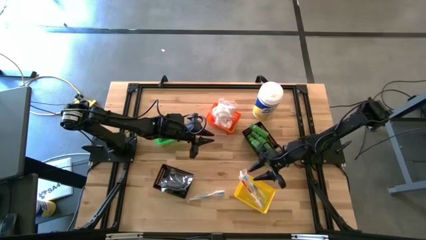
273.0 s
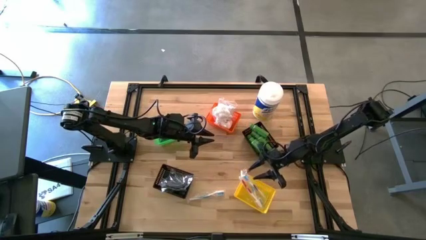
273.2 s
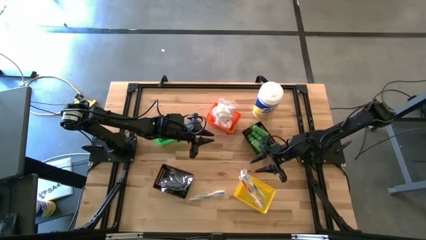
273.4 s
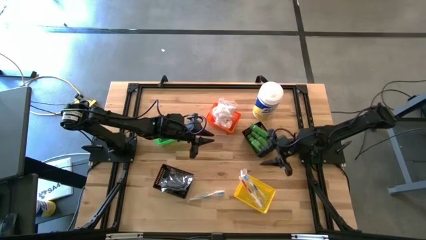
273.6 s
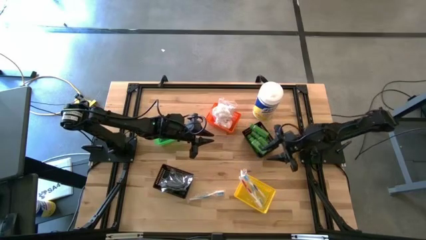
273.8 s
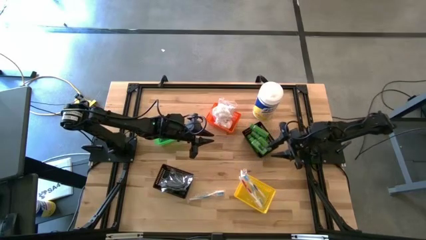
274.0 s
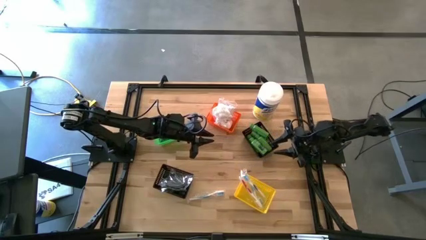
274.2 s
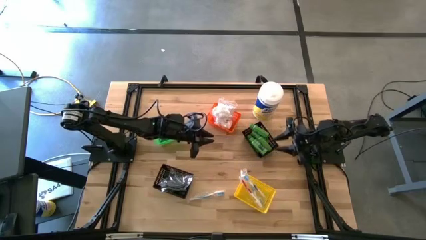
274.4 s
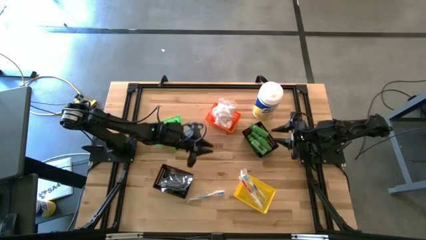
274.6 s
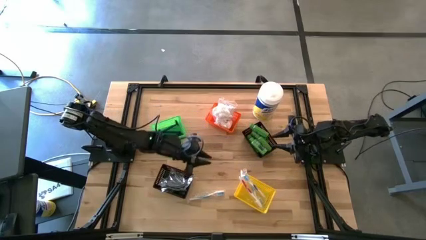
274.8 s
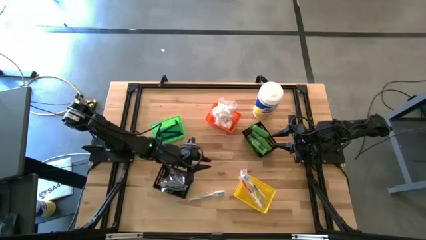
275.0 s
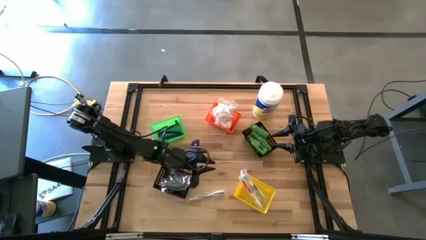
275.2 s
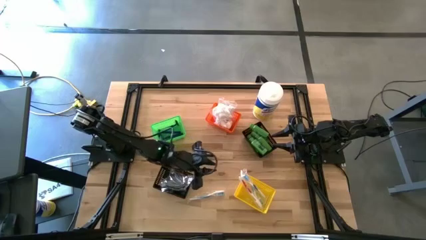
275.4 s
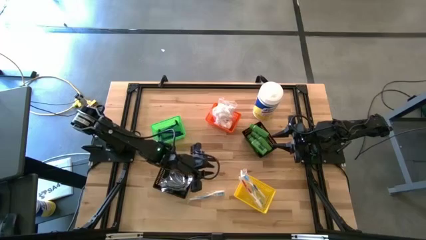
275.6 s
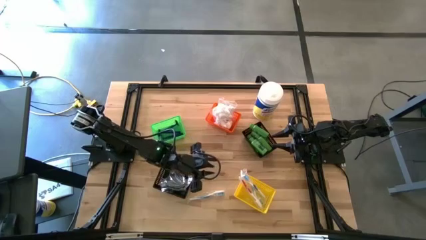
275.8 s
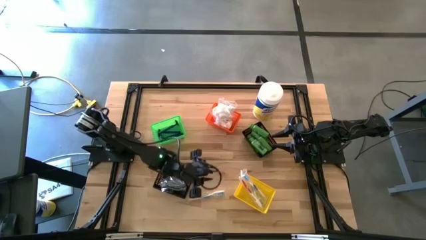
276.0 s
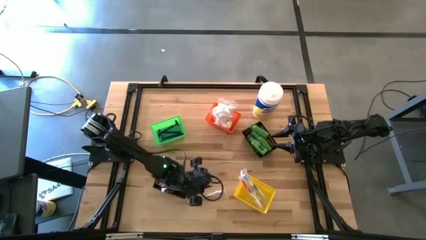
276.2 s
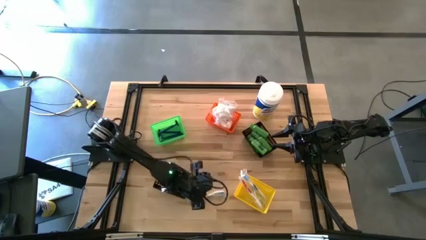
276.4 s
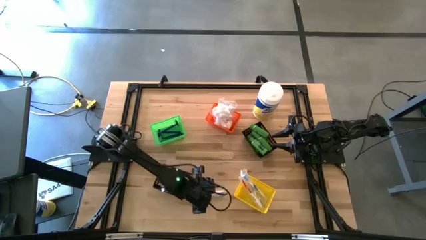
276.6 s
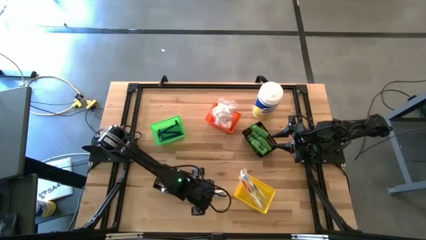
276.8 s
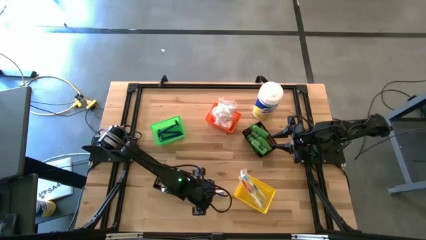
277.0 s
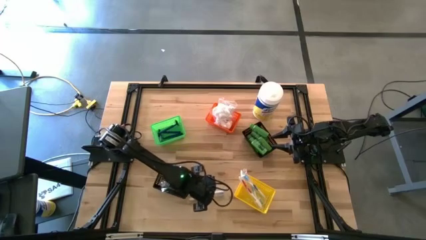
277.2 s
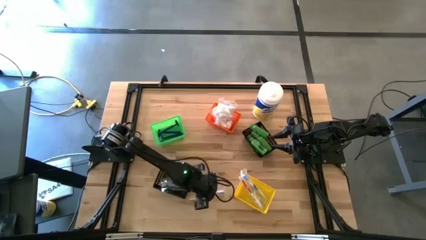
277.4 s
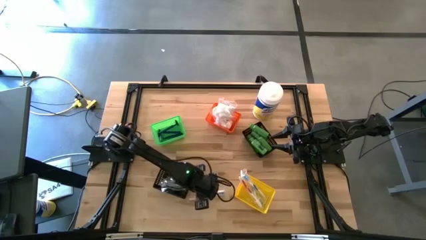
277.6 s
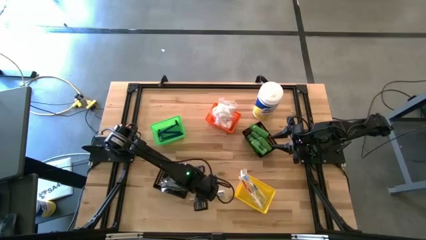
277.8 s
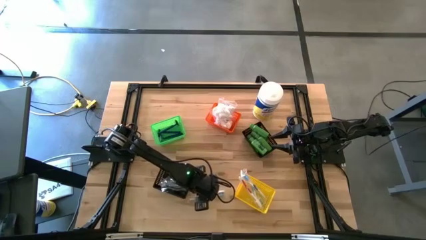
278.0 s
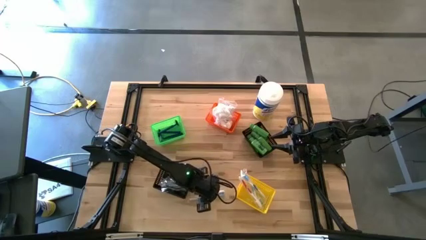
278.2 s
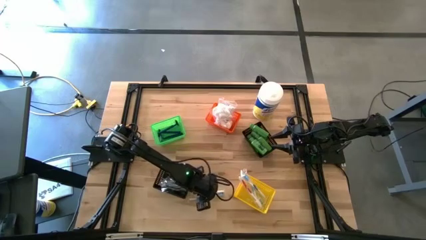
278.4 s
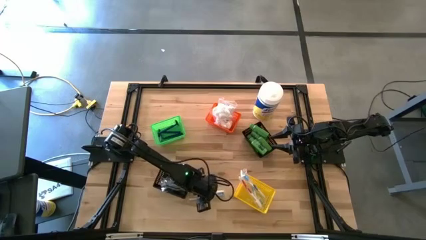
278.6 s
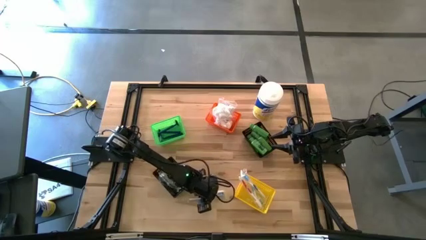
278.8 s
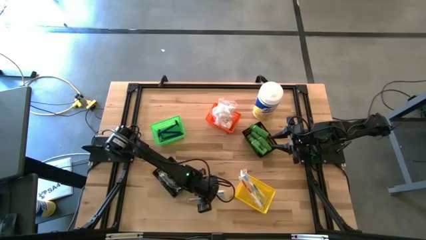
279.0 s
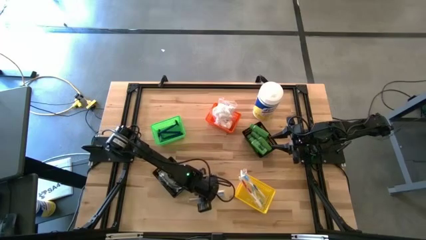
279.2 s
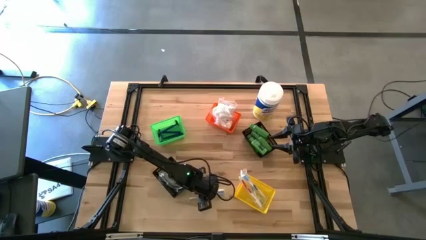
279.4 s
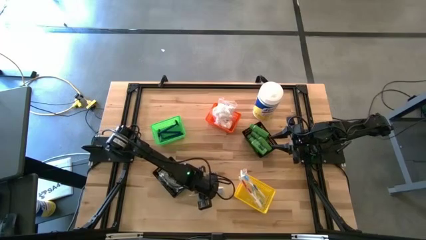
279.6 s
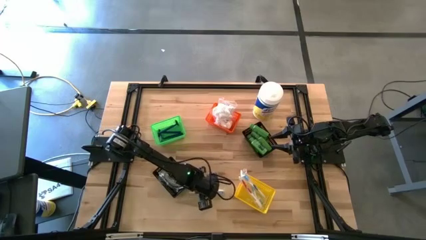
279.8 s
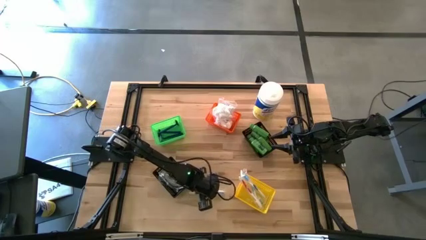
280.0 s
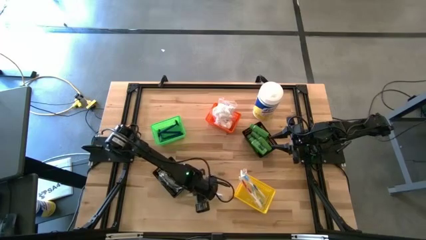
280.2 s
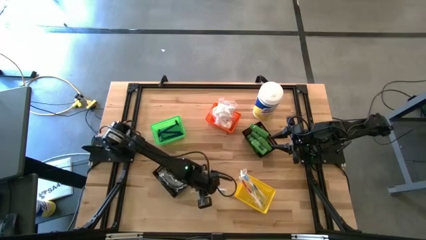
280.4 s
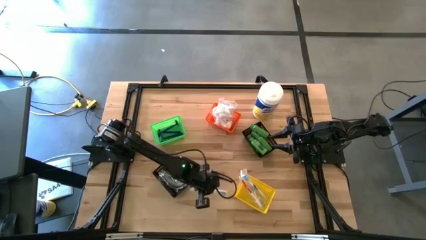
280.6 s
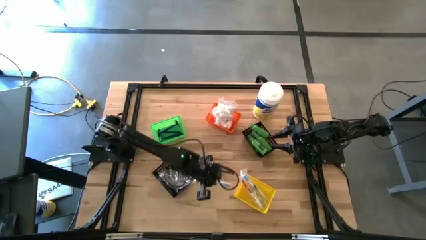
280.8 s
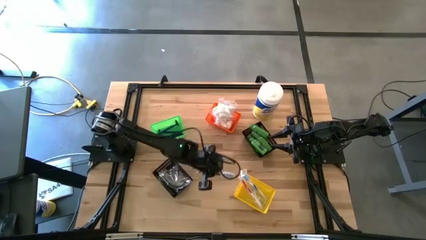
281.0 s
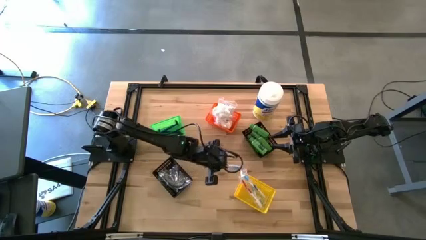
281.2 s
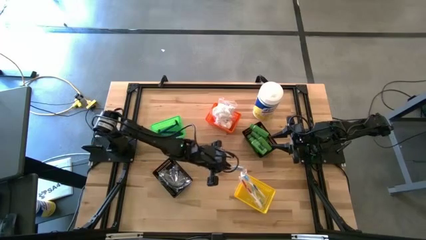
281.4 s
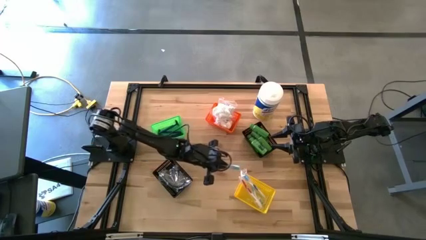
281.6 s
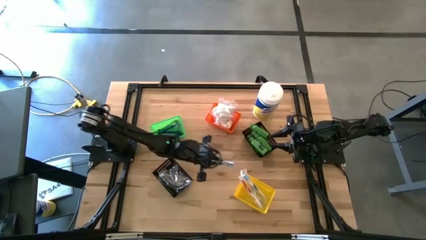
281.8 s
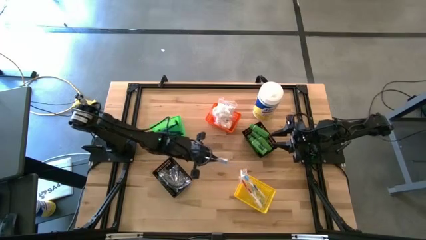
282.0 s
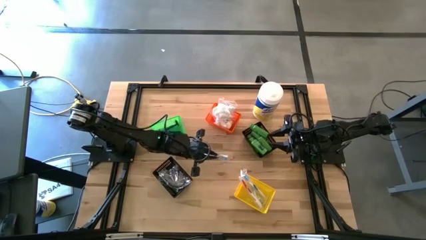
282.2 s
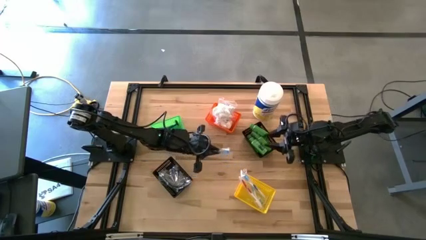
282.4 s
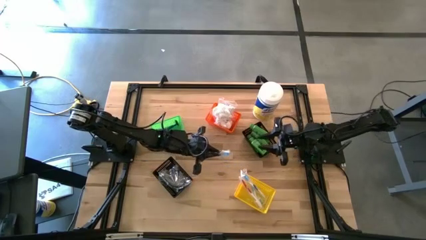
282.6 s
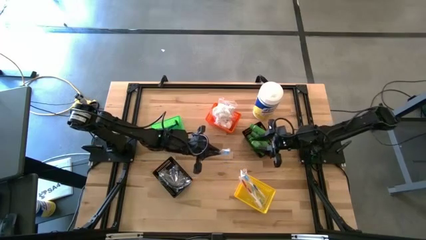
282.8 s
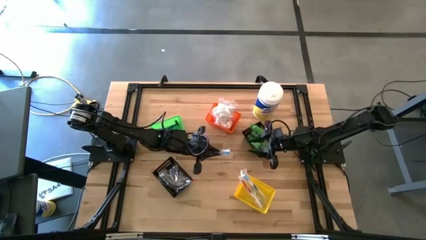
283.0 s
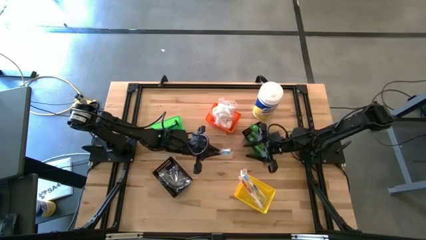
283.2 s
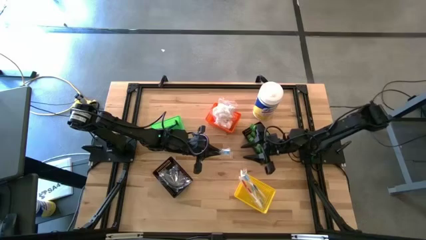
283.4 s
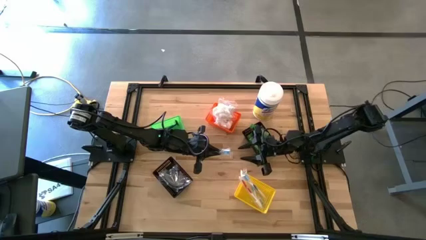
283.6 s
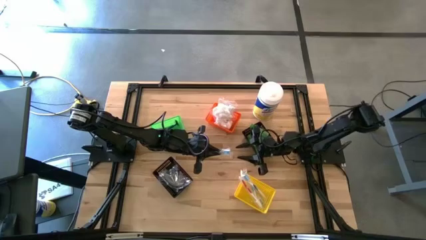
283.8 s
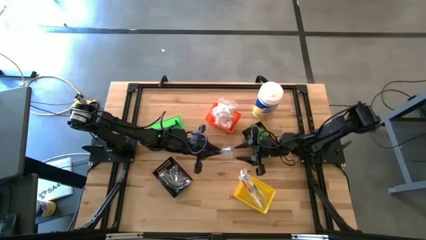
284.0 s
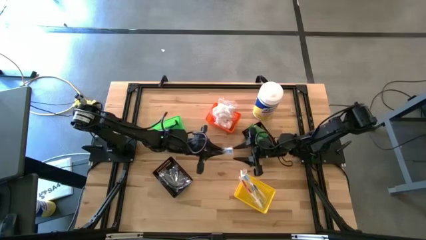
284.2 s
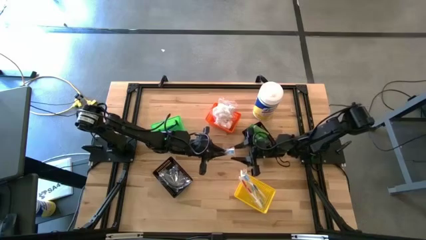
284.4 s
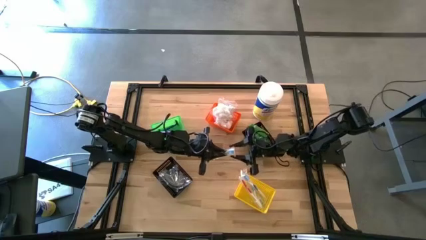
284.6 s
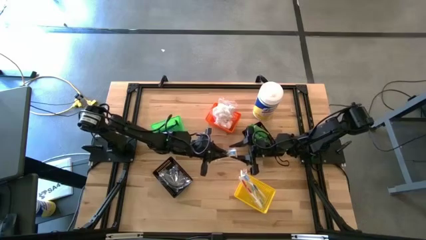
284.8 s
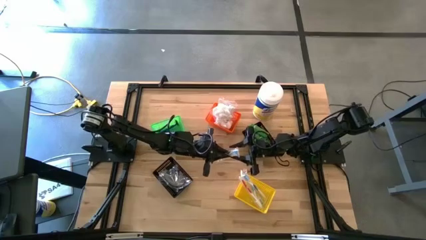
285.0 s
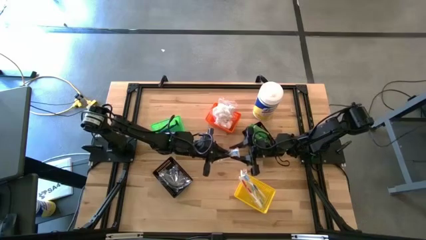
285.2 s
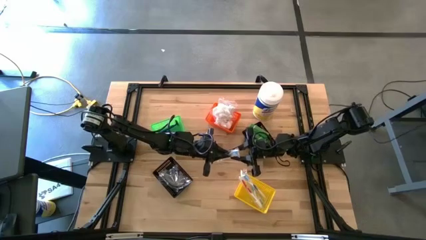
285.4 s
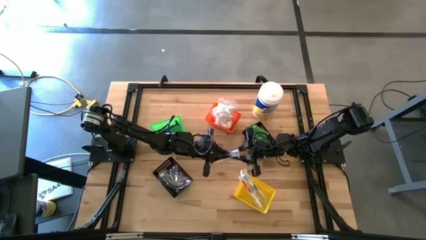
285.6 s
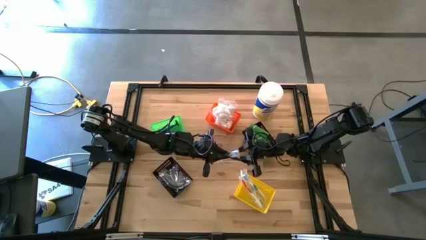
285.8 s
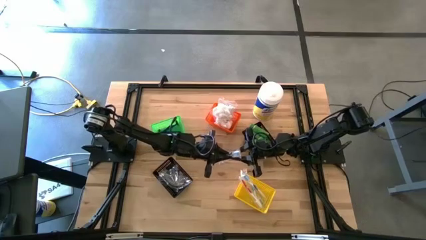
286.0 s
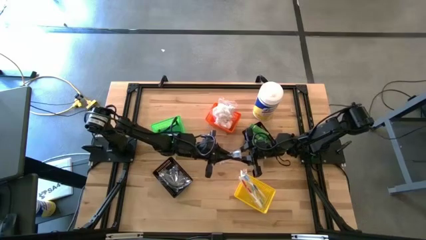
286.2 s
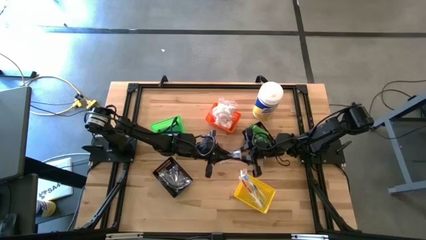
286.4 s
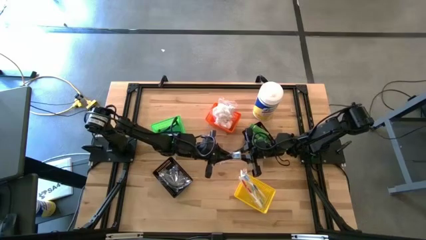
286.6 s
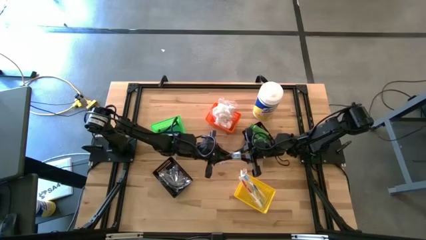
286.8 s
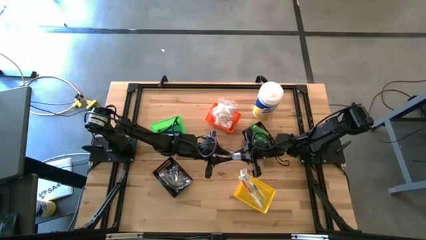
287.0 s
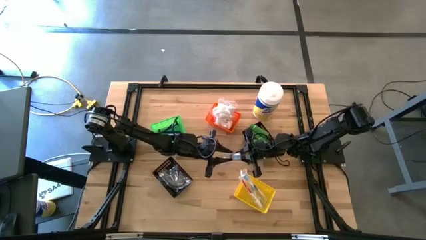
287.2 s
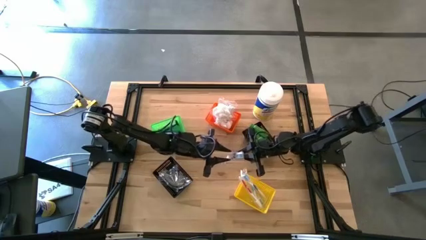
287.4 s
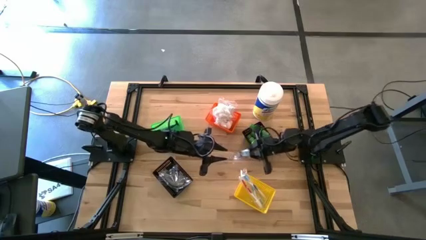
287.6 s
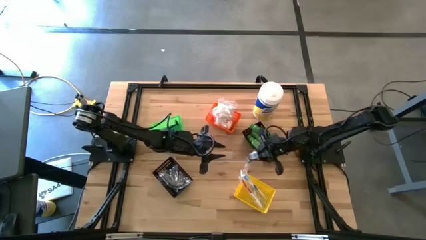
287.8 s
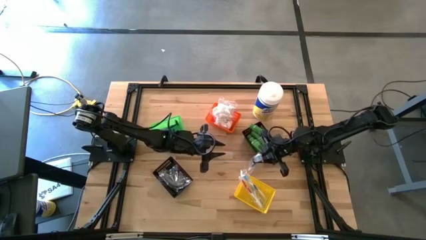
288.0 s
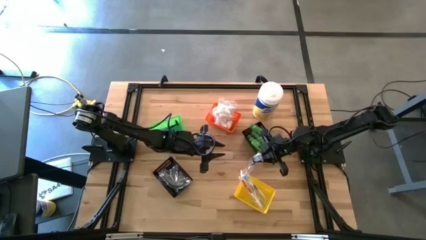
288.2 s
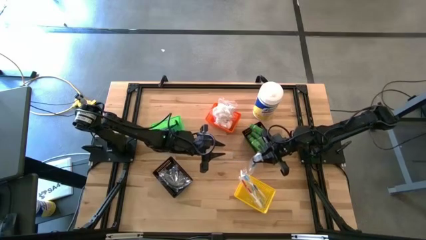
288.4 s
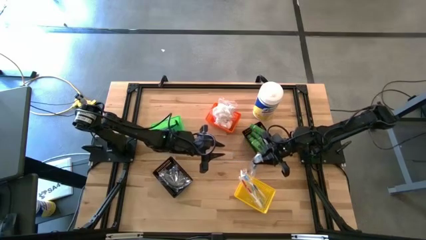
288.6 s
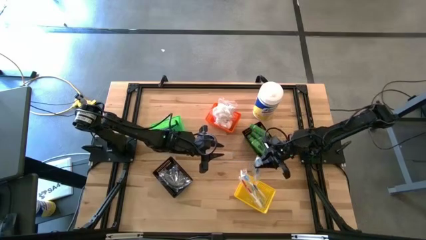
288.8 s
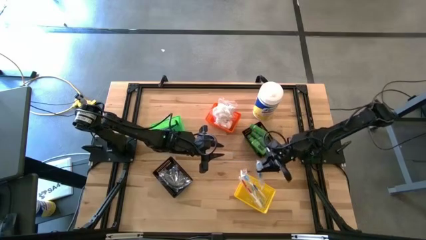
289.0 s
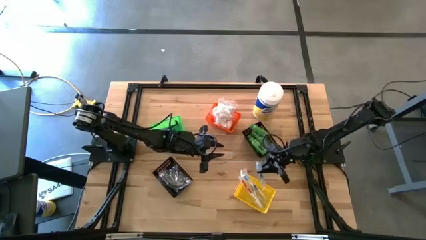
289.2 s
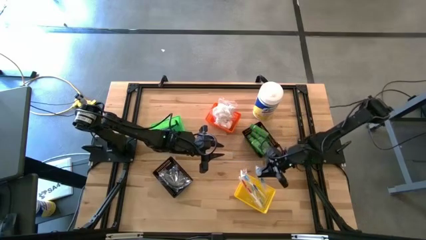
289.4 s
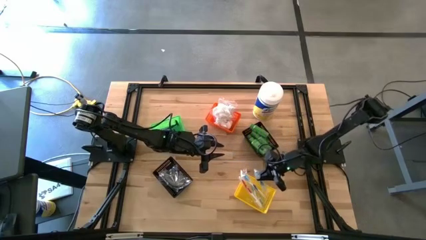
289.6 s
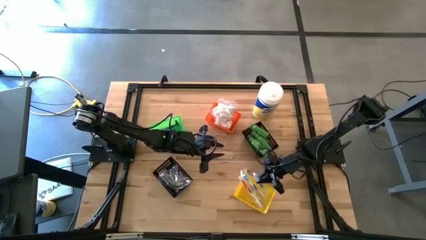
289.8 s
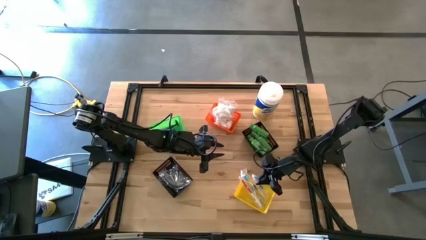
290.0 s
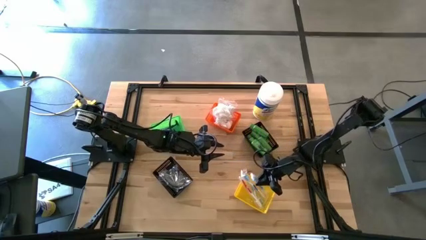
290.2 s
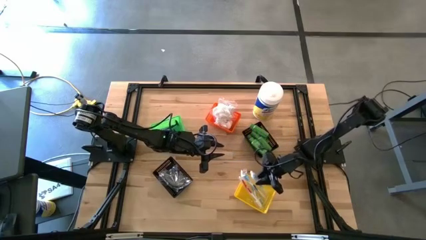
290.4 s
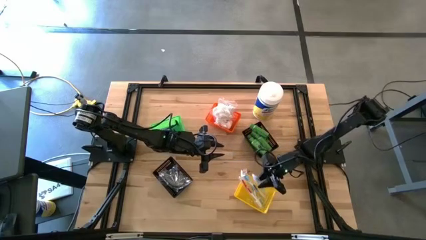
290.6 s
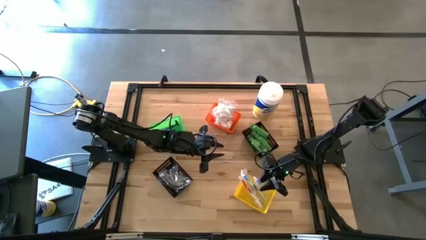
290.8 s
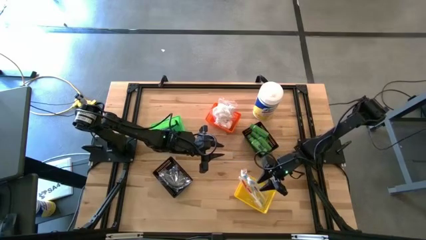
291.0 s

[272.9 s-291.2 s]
Task: Pick & Place Travel size toiletries
Put the blue toothbrush into the yellow bin
